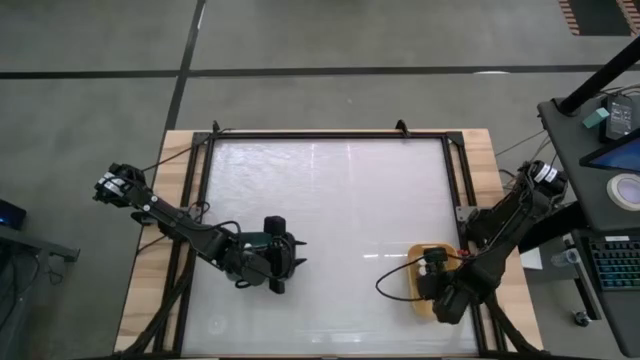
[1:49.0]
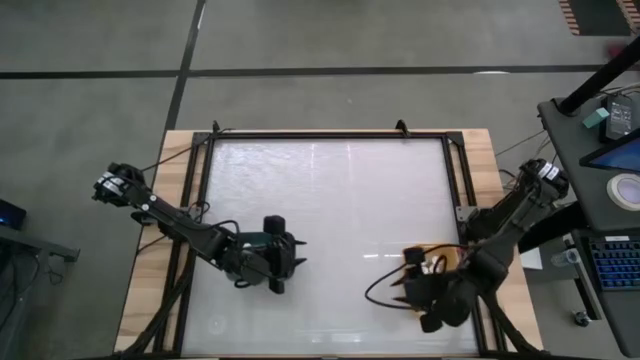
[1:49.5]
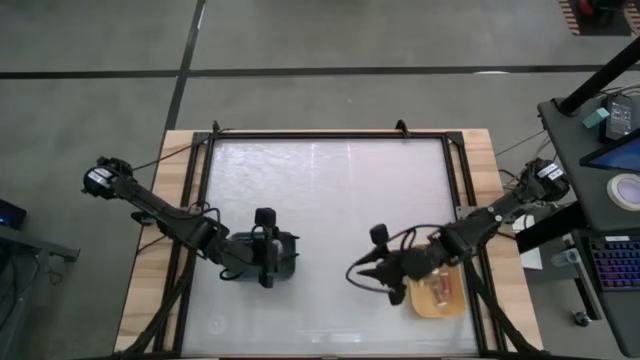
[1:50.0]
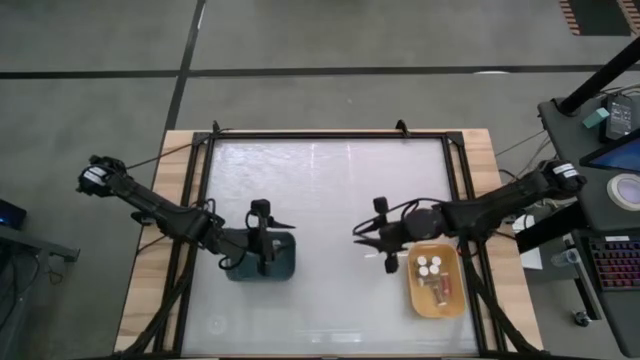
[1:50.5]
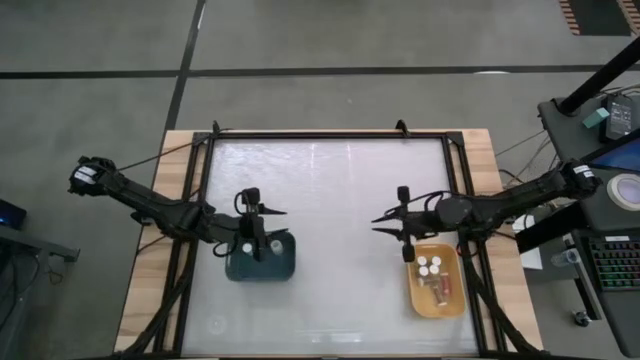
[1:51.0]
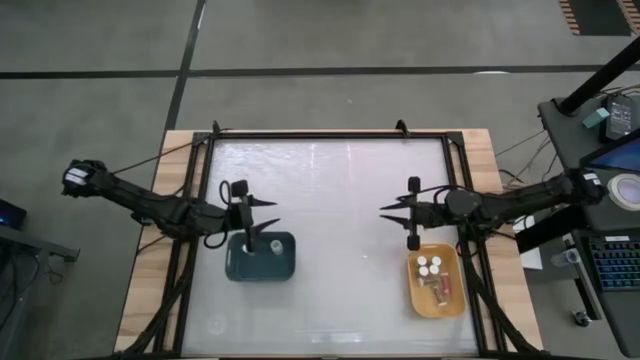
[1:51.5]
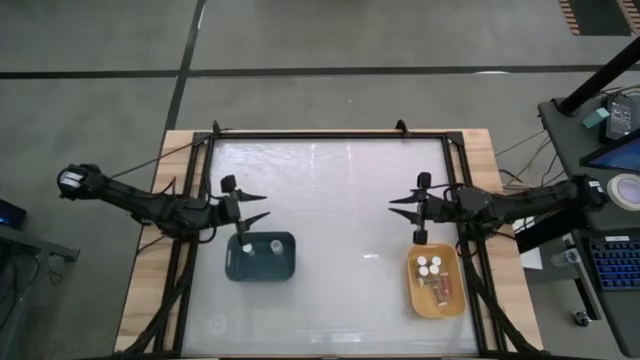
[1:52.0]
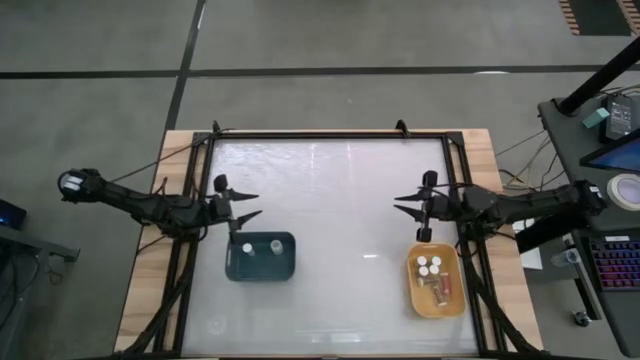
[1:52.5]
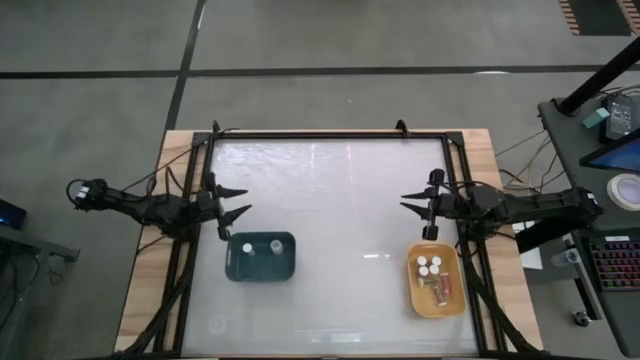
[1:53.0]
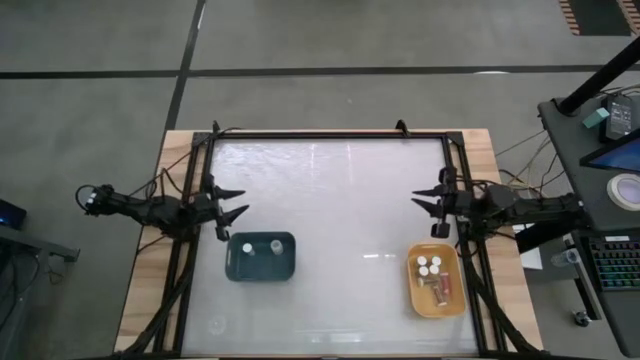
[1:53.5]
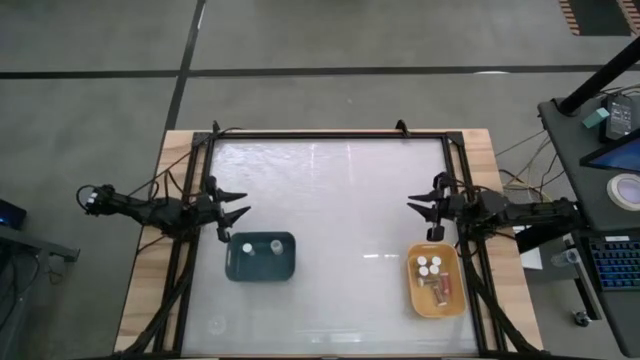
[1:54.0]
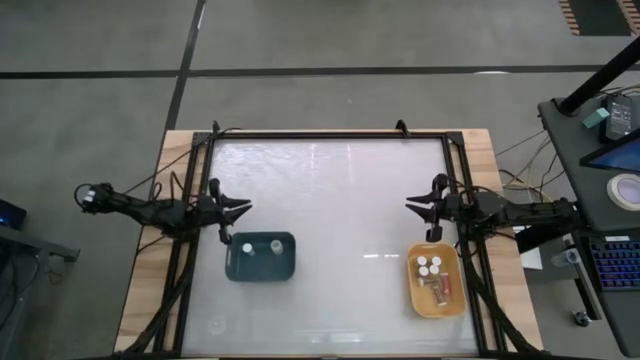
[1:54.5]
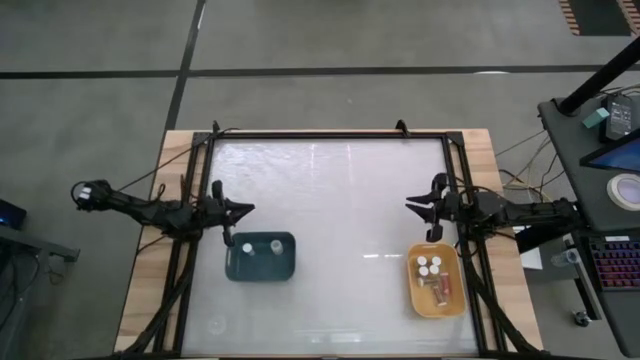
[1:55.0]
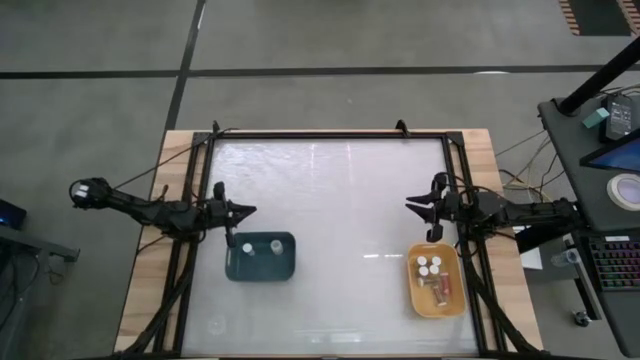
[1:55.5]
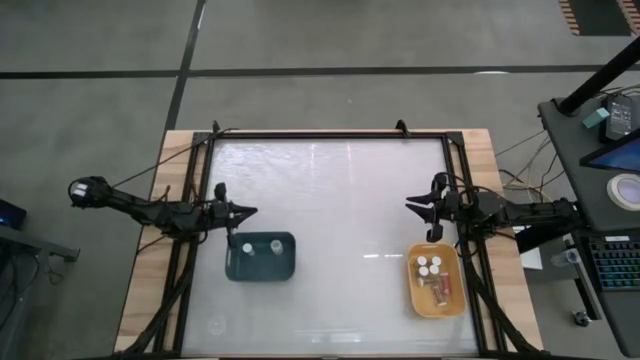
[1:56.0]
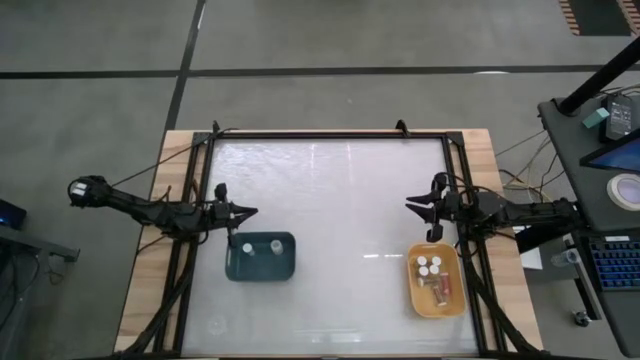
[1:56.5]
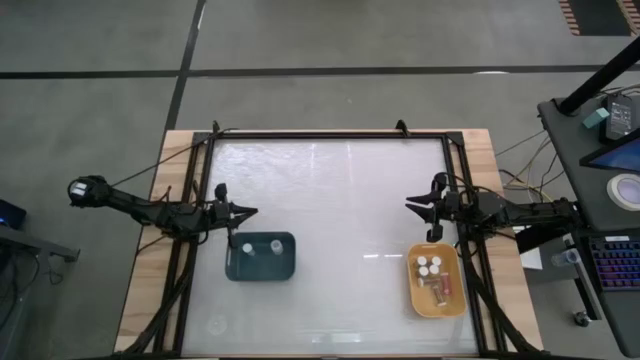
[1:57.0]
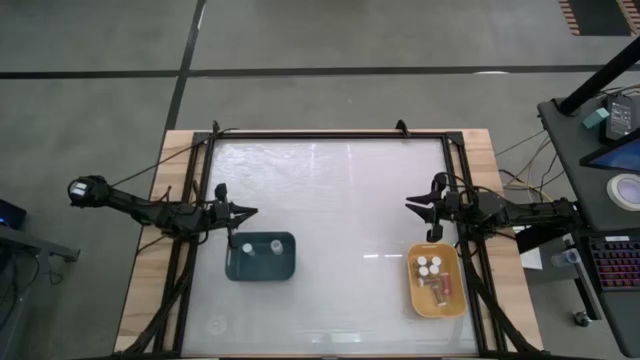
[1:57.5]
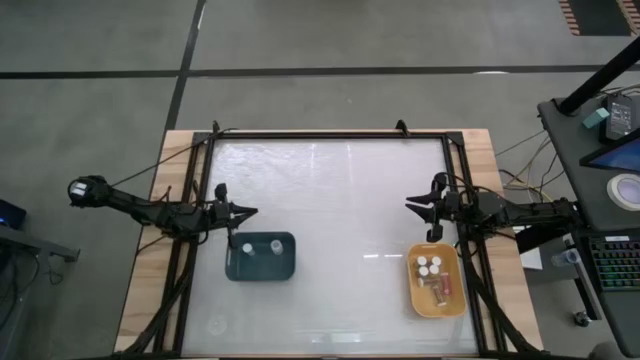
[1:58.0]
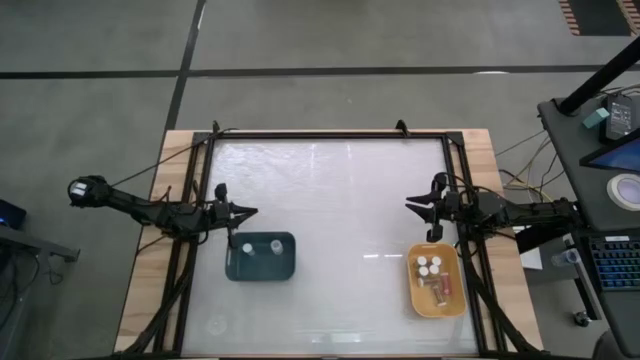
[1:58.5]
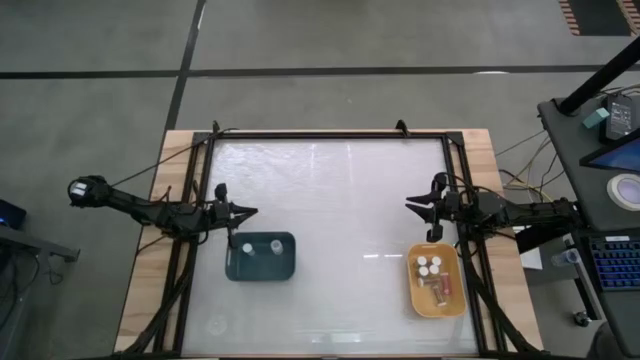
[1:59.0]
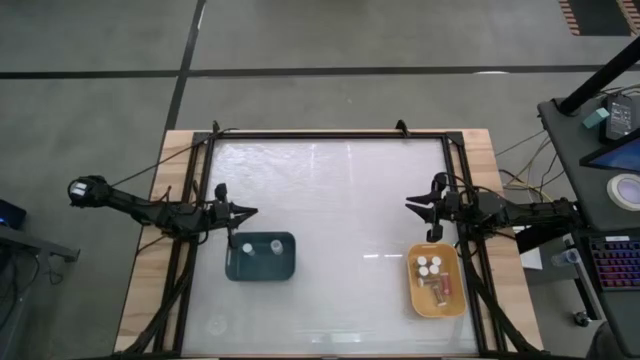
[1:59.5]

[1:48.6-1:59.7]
Task: Pick and place medicine bottles into bin by pill shape (circle, oval)
Return to Home Position

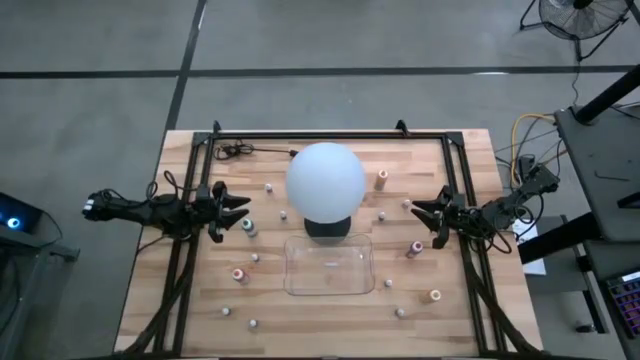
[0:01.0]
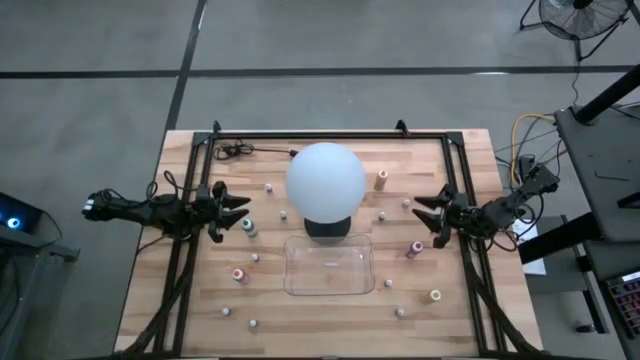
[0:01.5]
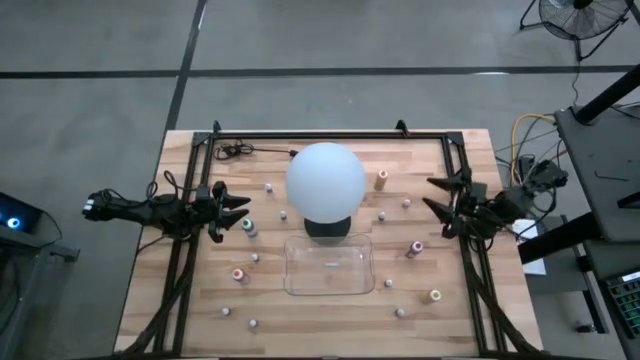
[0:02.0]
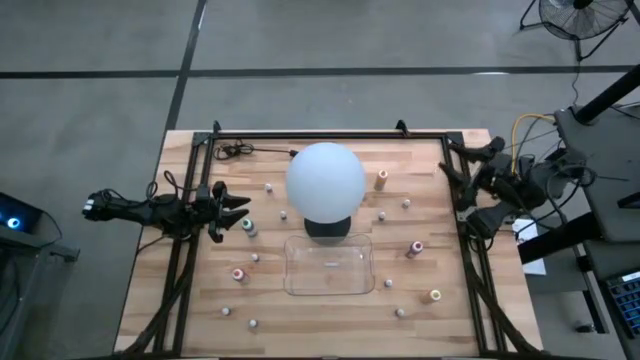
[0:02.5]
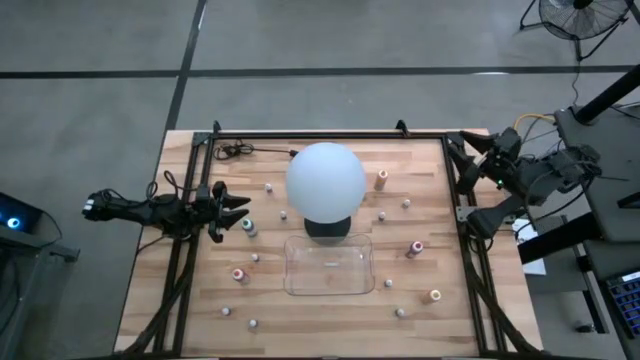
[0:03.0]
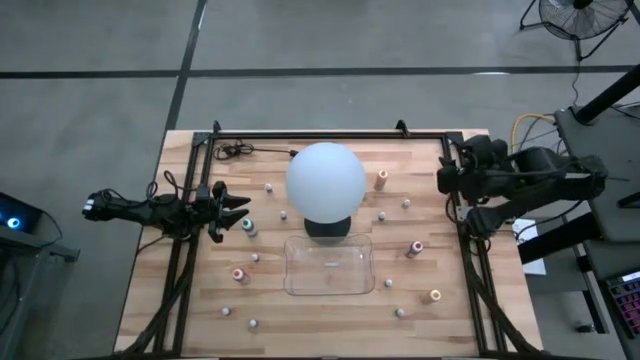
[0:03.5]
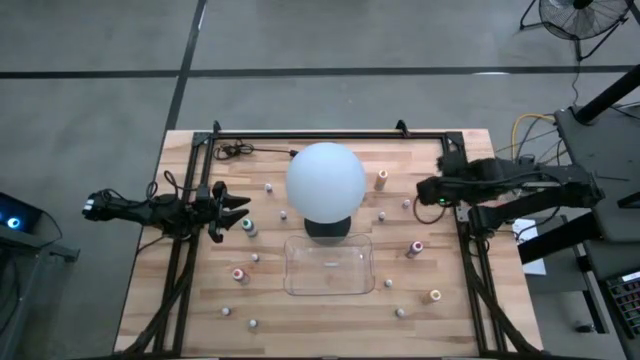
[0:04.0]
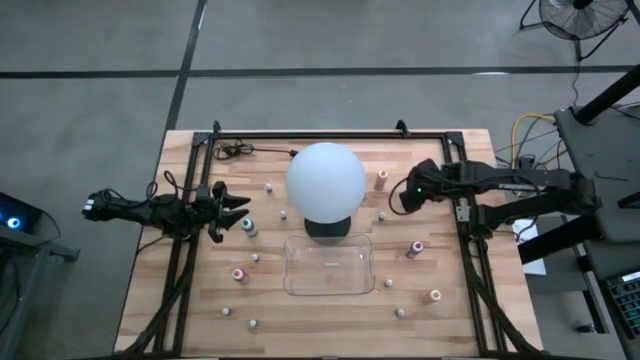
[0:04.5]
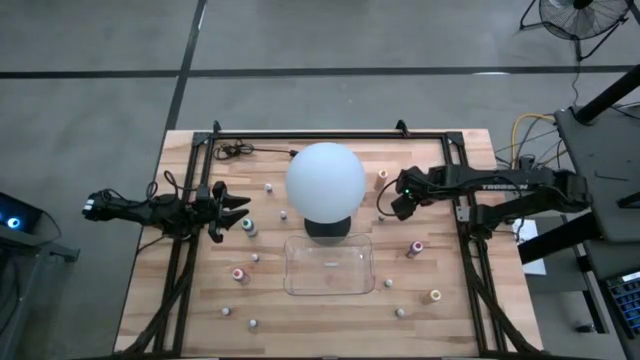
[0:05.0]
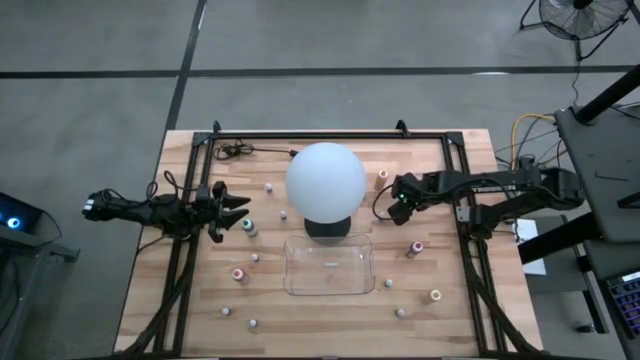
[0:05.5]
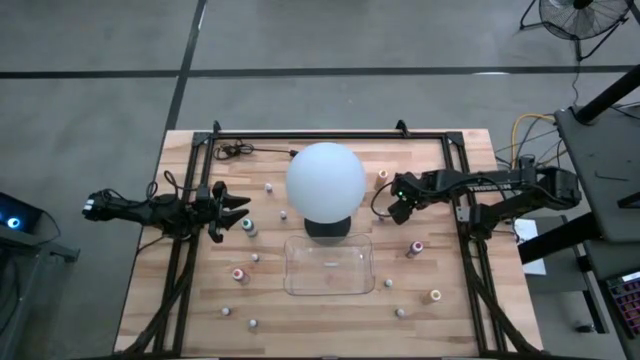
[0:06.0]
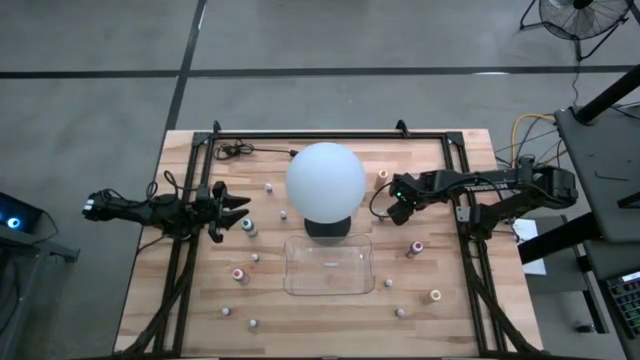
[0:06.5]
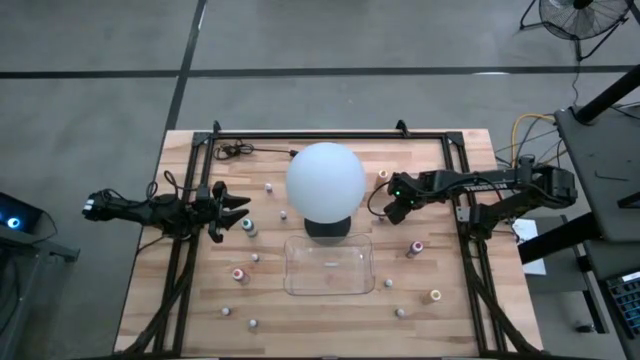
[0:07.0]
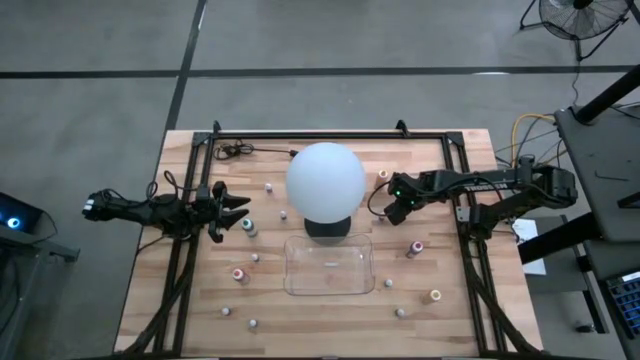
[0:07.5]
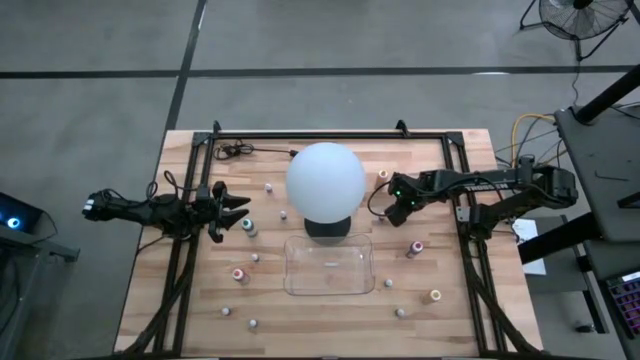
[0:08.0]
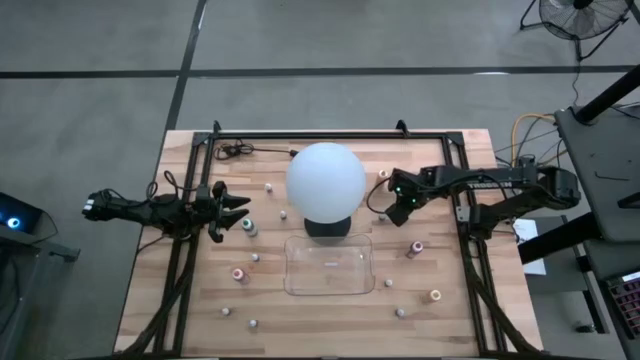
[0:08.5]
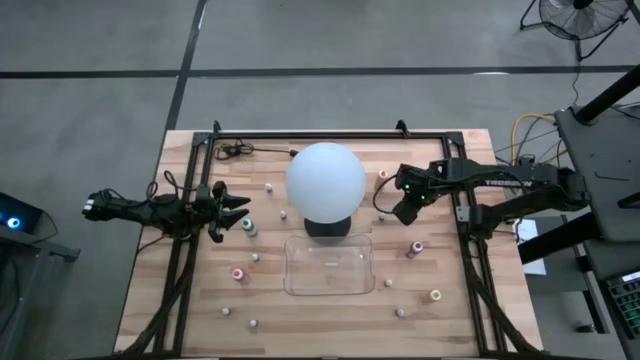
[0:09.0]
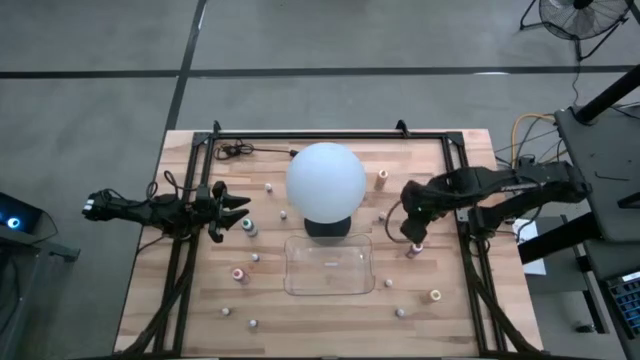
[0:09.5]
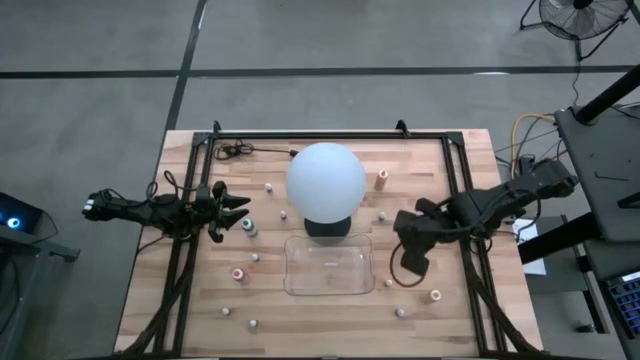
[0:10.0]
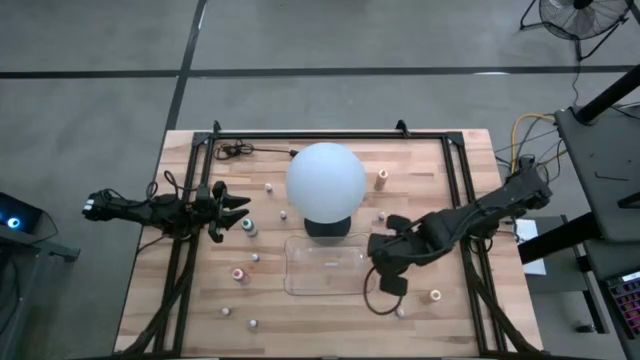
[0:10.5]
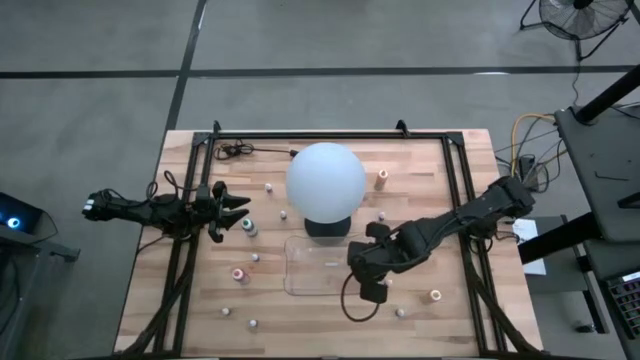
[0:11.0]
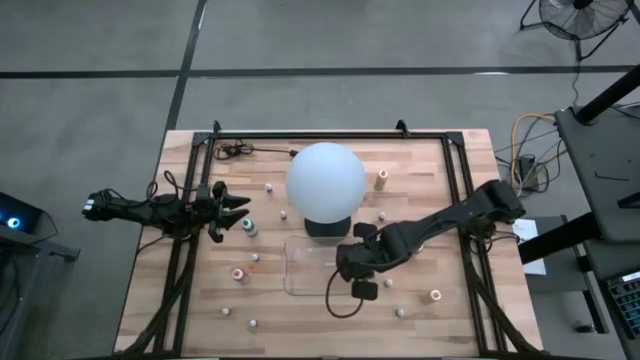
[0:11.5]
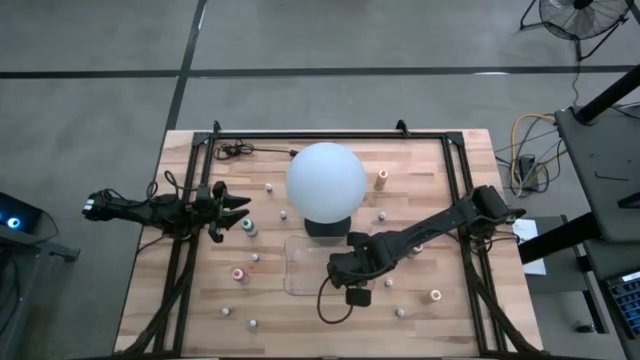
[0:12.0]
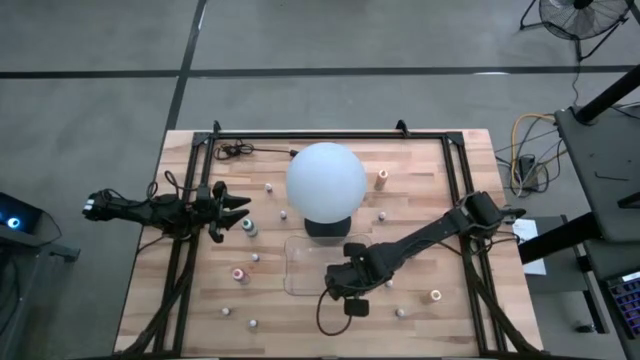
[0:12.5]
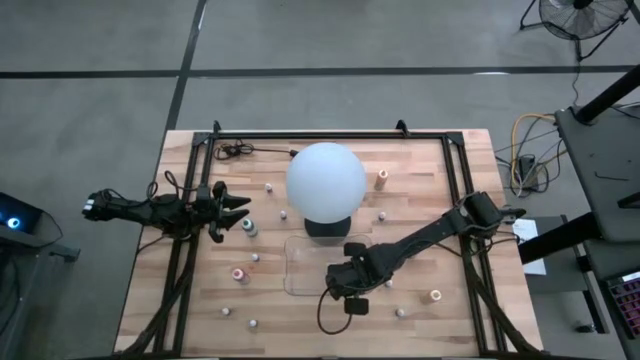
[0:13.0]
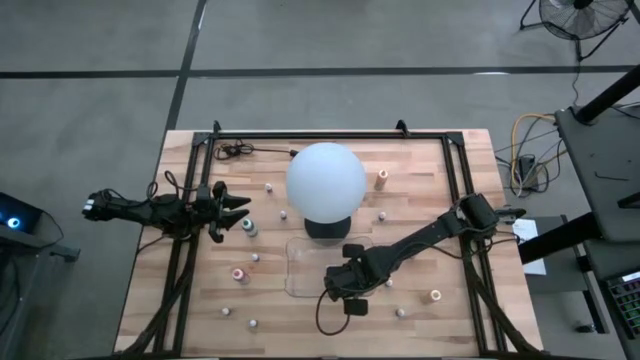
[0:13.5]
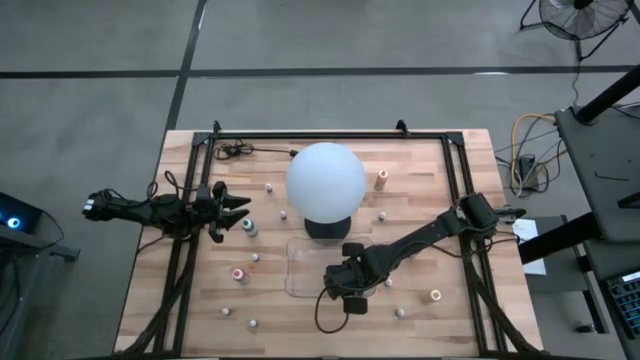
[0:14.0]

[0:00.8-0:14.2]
Task: Pick & Place food coloring
Put the bottom small orange food coloring bottle into the transparent bin
